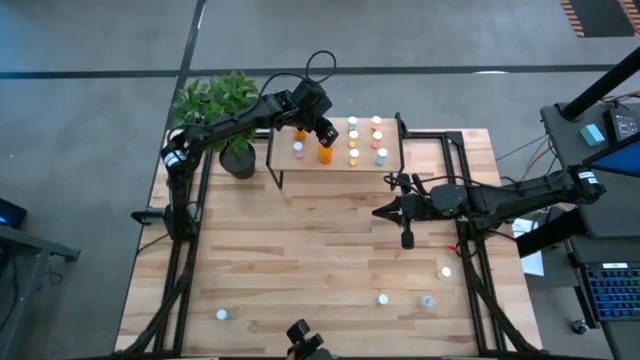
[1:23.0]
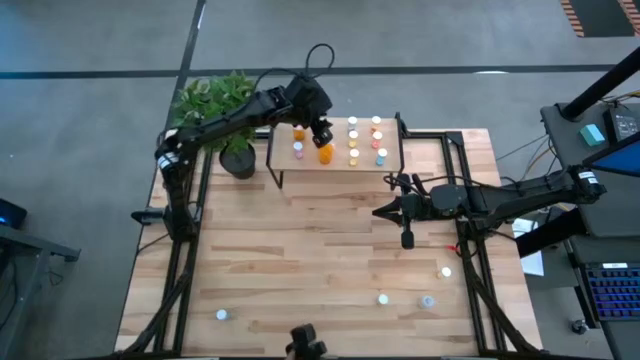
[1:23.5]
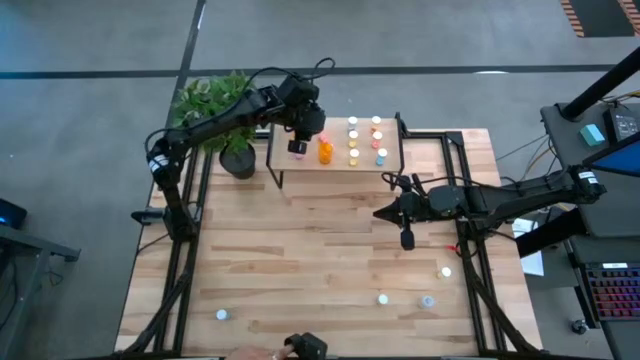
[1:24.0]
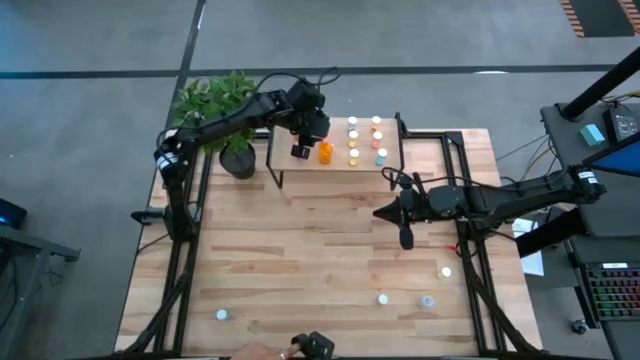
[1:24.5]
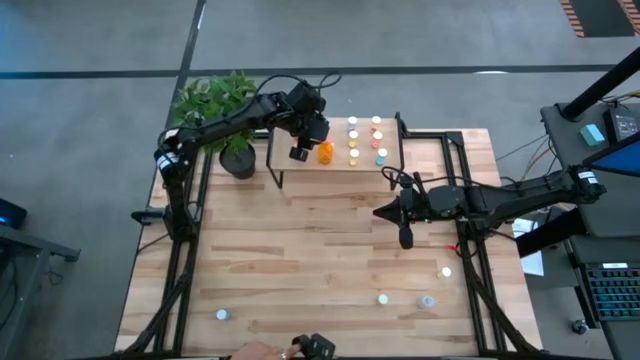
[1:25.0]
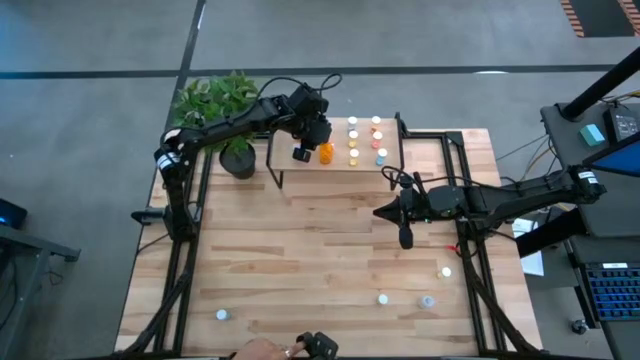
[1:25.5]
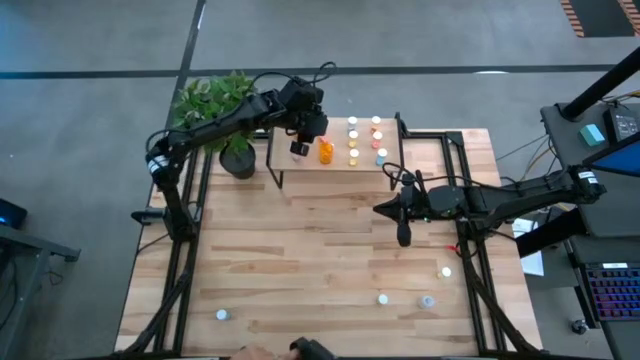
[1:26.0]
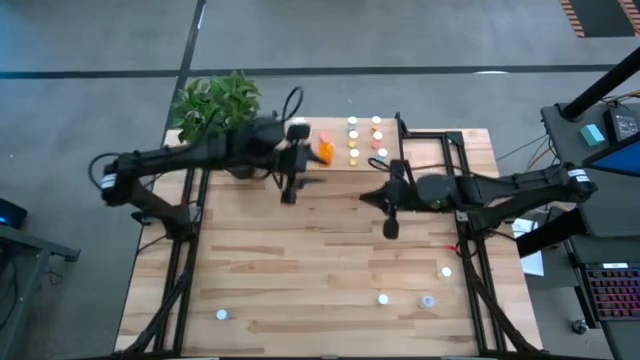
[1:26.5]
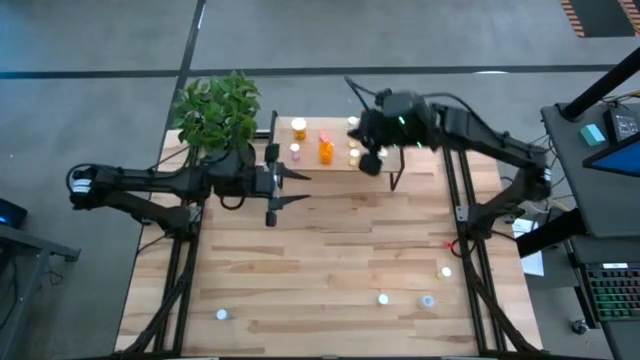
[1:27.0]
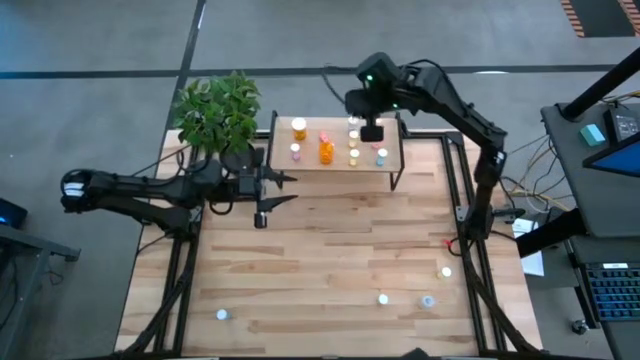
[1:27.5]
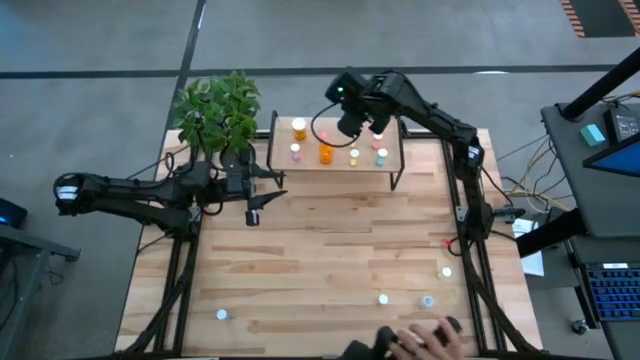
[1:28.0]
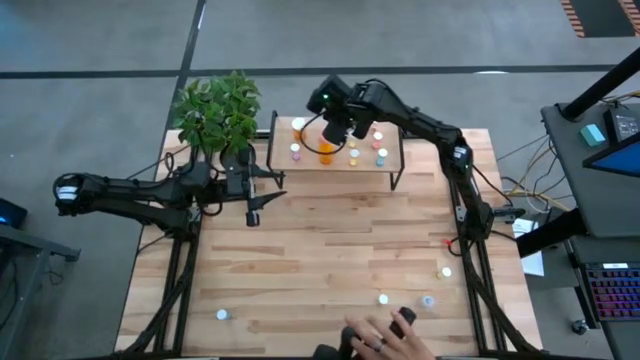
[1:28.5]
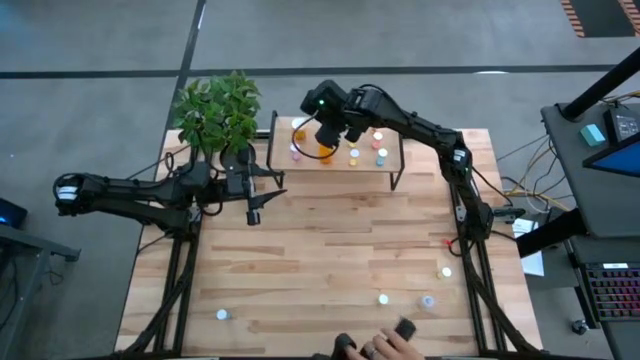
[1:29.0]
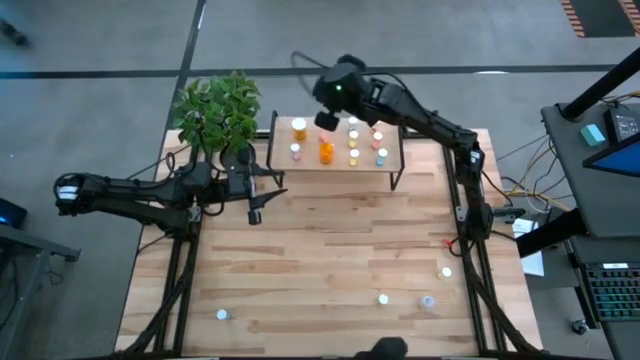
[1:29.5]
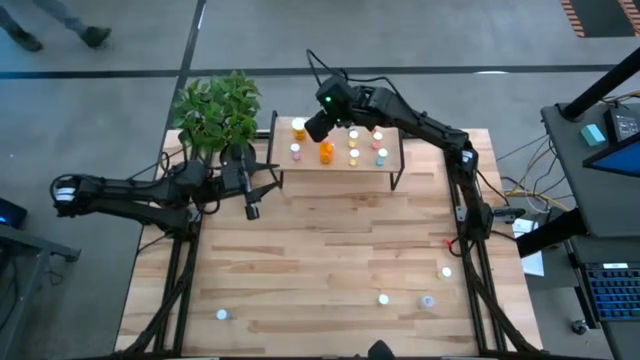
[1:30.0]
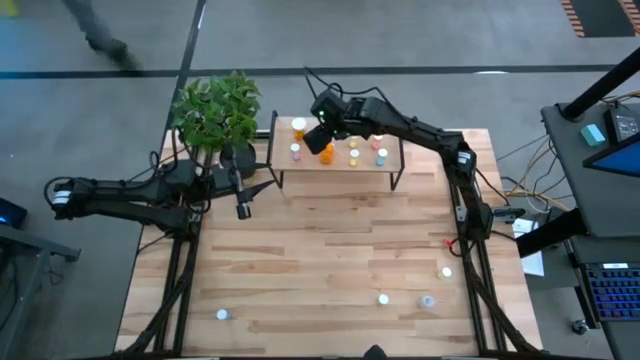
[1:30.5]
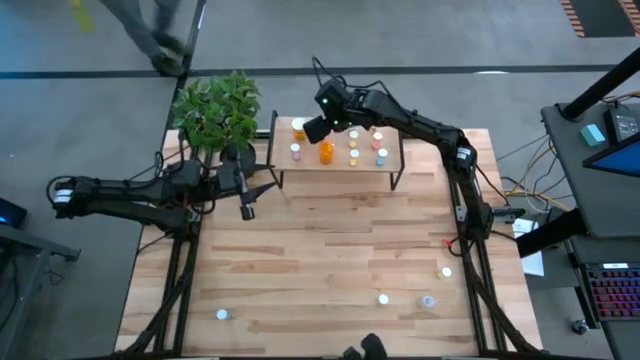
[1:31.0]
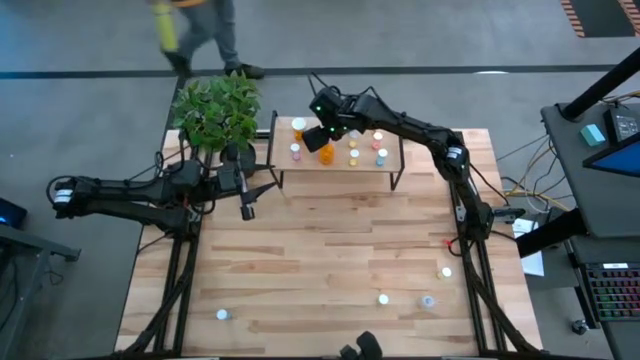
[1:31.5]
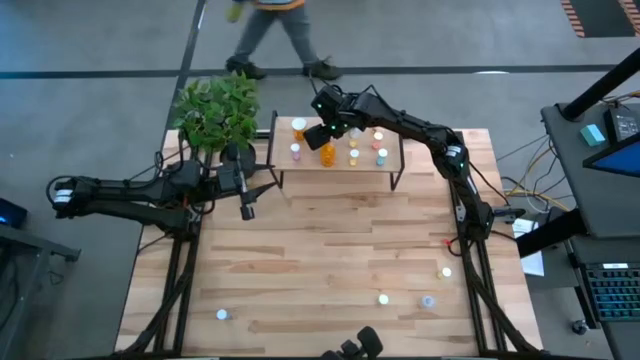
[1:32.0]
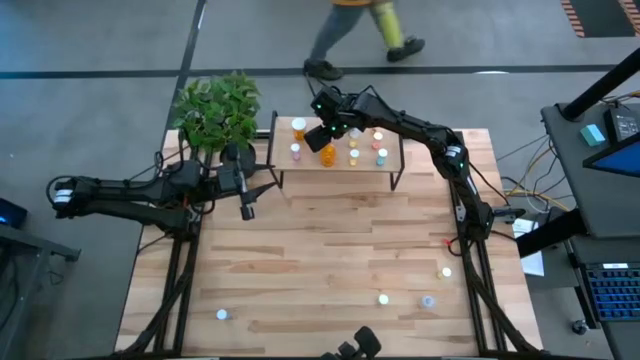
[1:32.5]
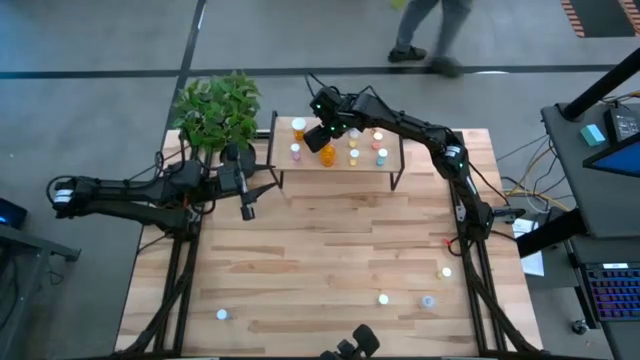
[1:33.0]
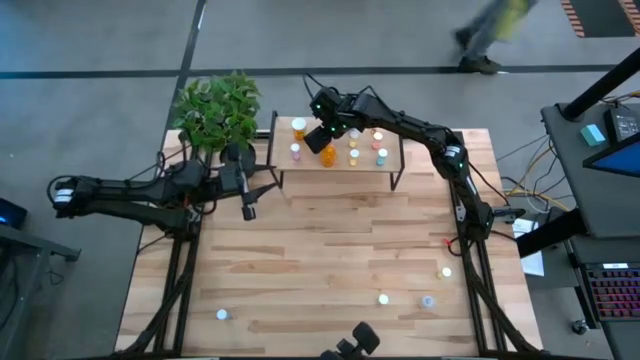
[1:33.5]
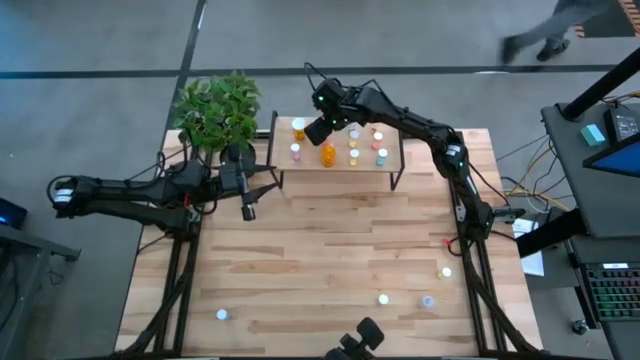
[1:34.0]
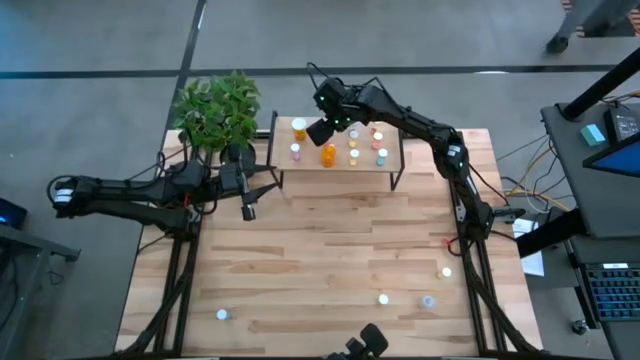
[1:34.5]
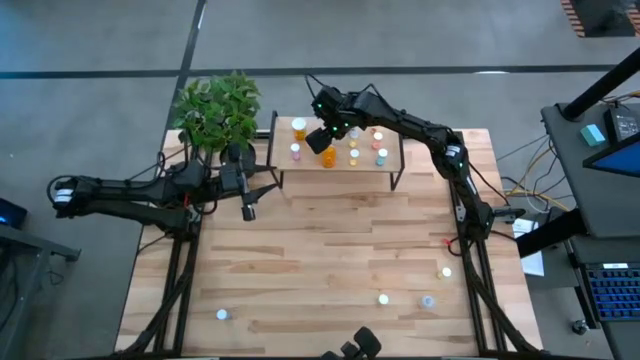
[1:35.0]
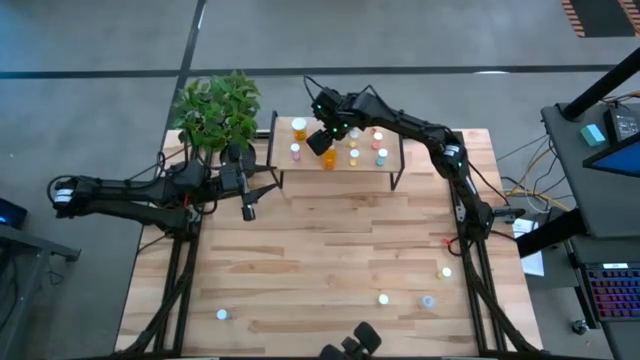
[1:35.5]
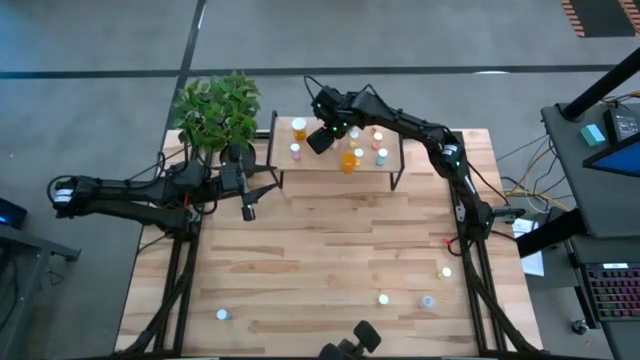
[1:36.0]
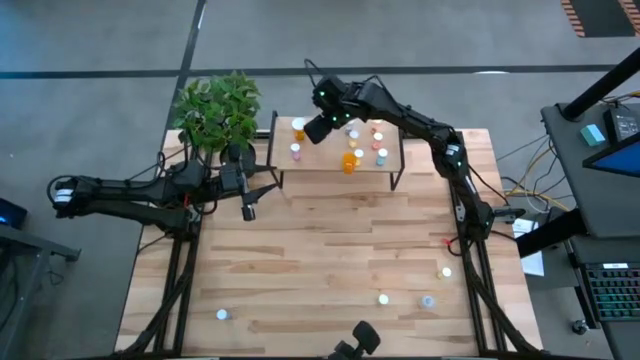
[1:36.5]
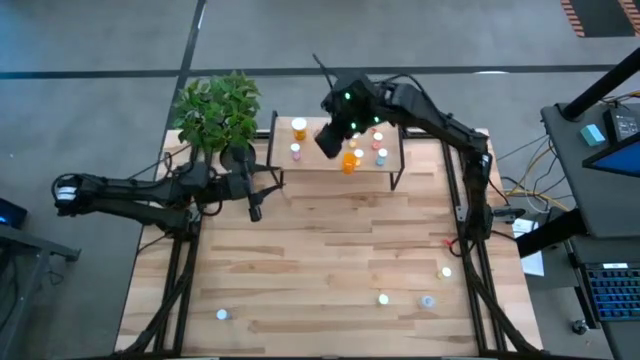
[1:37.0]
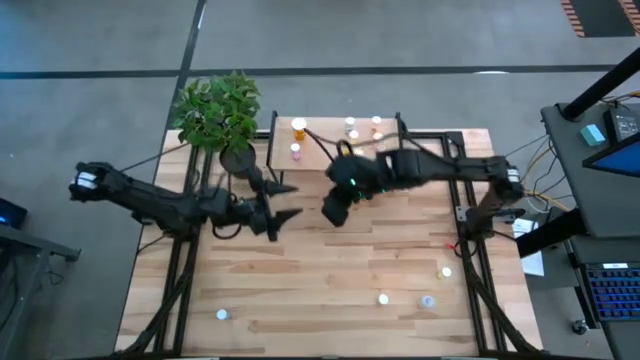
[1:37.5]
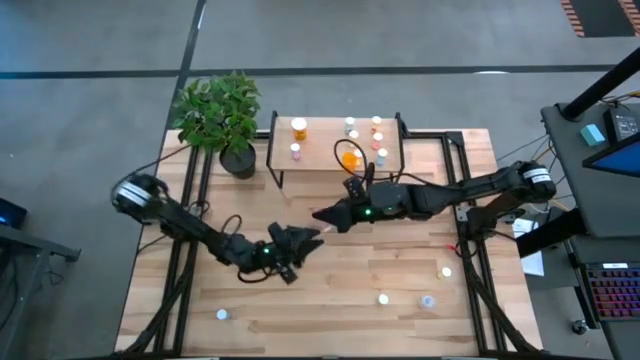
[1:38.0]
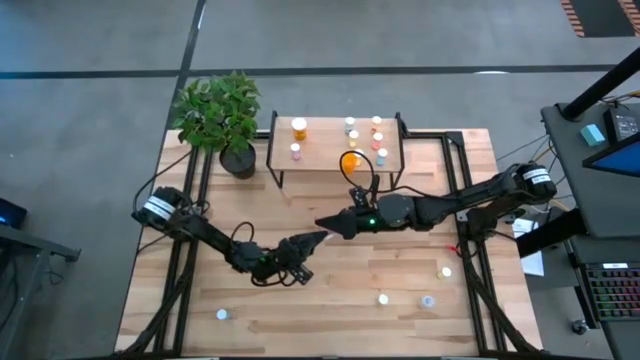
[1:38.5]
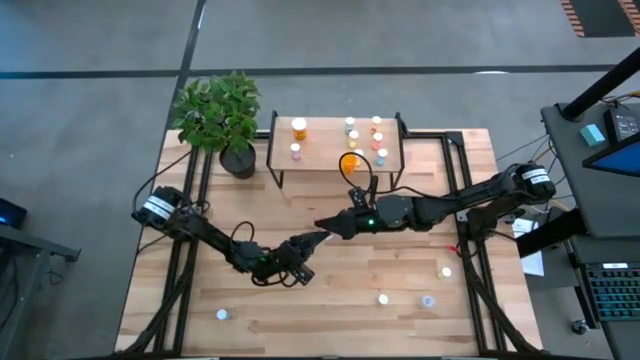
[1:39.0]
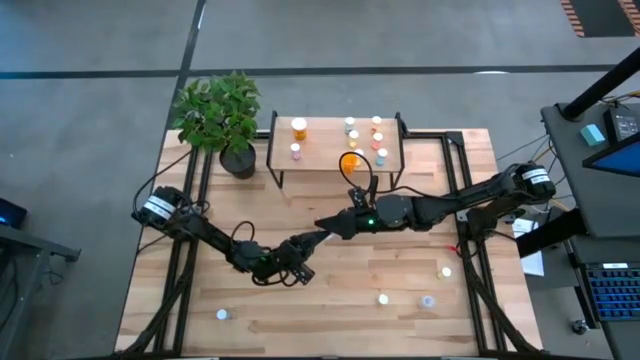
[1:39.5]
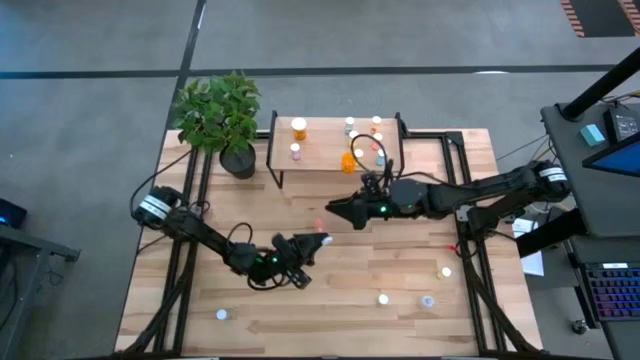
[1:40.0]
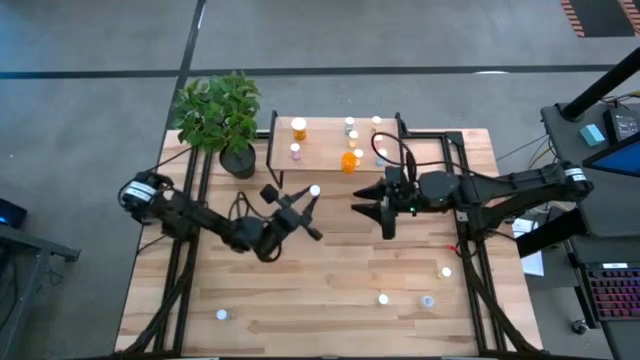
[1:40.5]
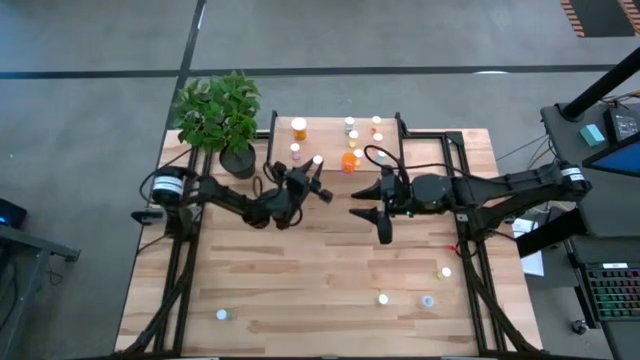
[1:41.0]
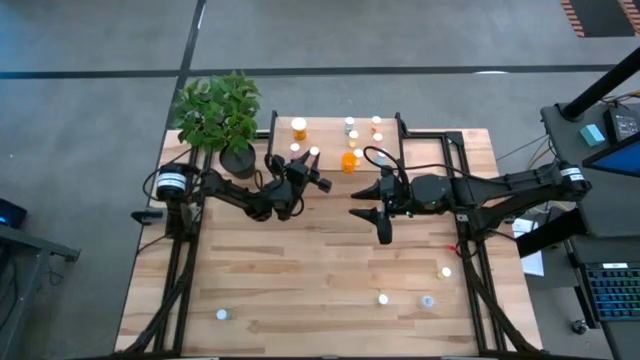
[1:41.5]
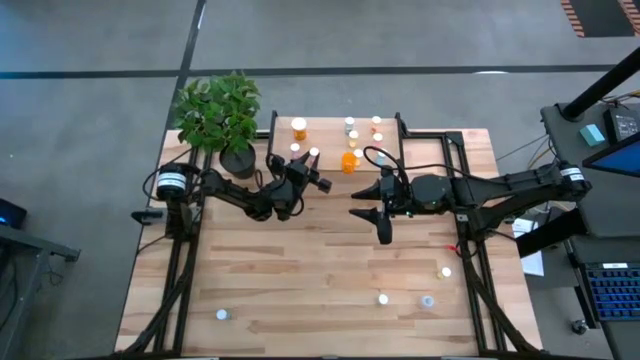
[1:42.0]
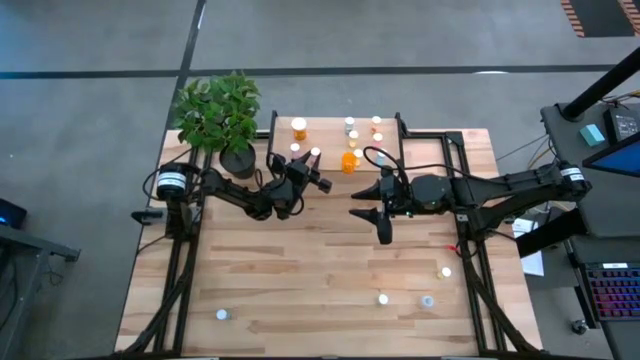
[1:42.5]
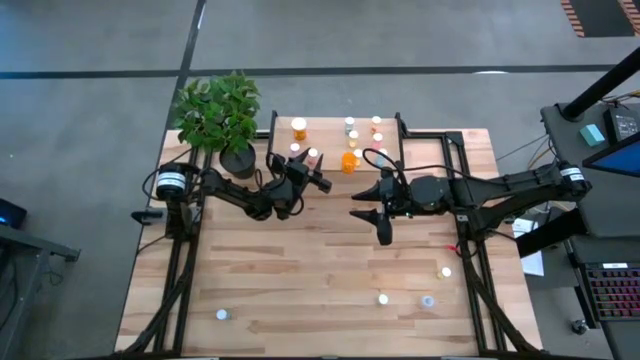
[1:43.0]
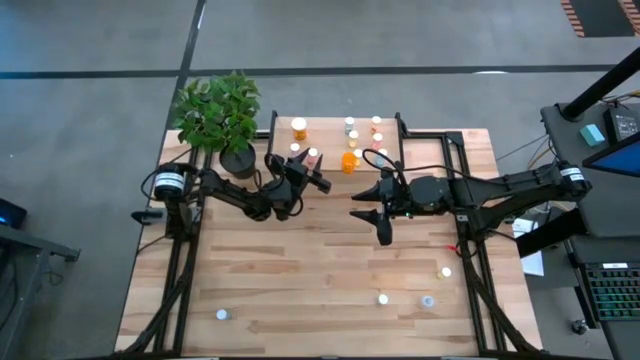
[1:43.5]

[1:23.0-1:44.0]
Task: Pick and place medicine bottles onto shelf by color
Put the red pill bottle on the shelf

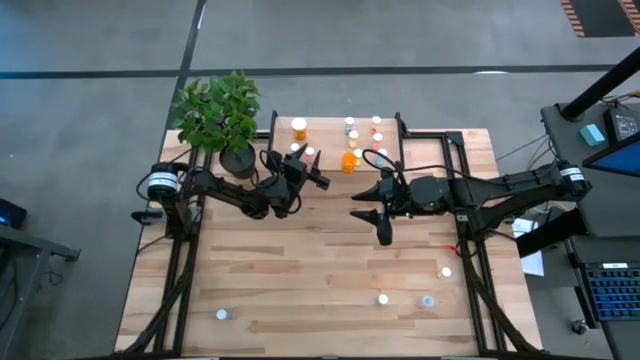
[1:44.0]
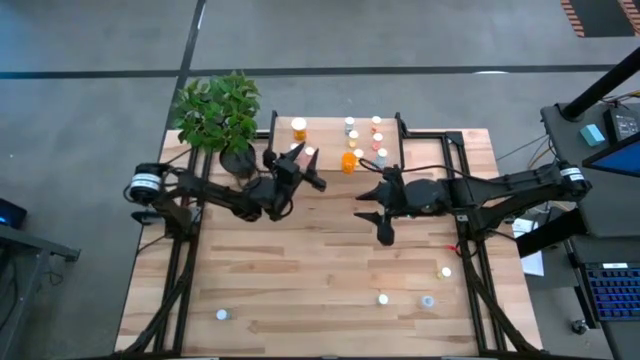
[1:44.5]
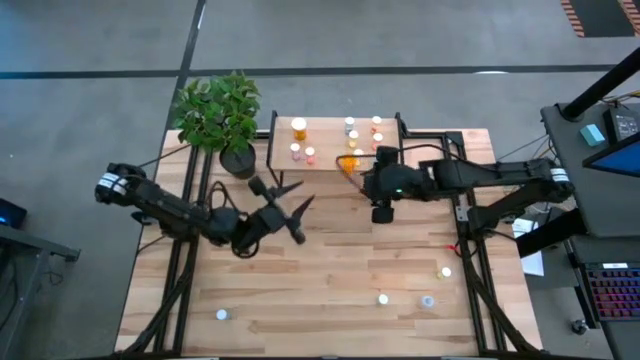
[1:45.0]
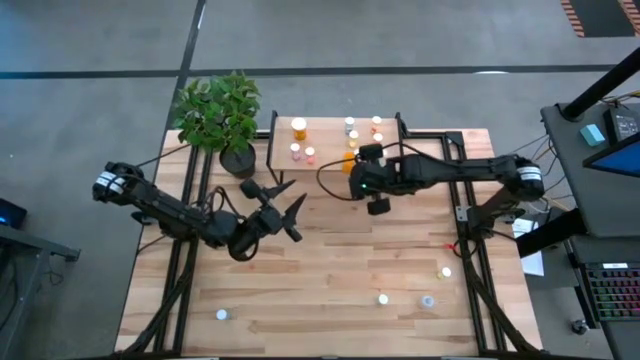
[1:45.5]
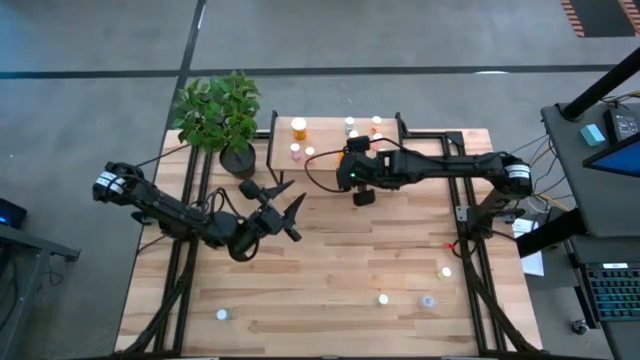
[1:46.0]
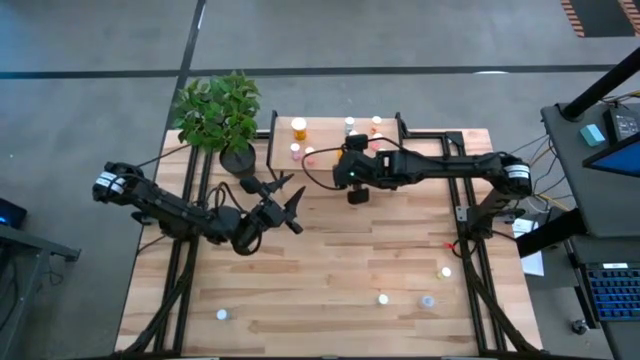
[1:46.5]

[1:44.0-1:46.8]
Adjust the bottom orange pill bottle
